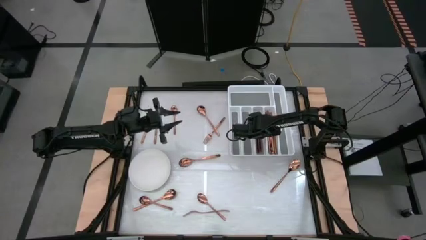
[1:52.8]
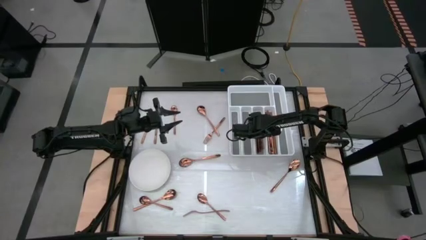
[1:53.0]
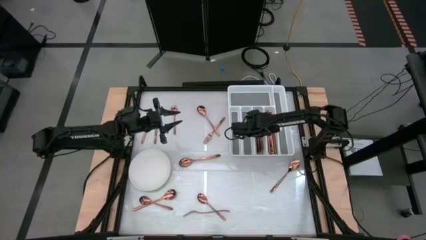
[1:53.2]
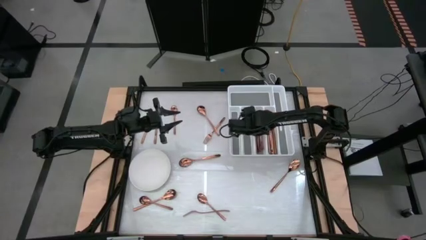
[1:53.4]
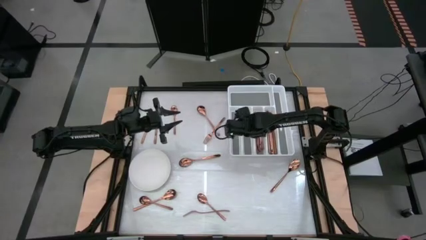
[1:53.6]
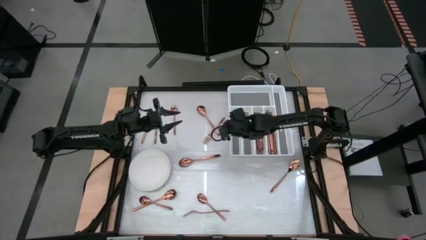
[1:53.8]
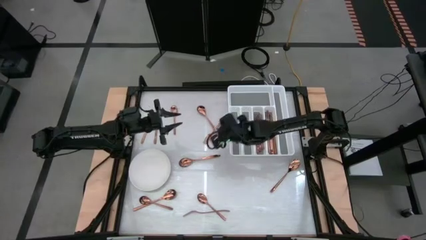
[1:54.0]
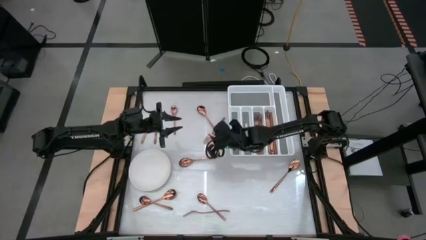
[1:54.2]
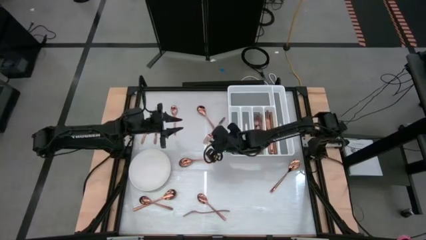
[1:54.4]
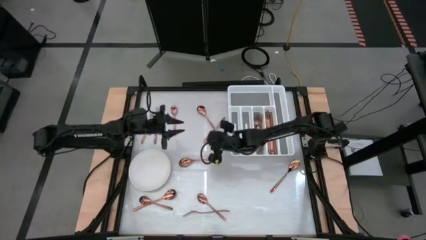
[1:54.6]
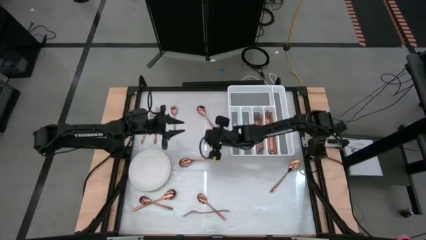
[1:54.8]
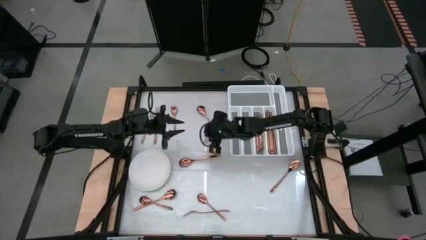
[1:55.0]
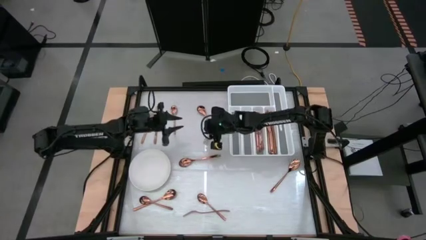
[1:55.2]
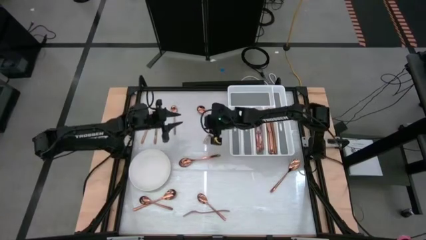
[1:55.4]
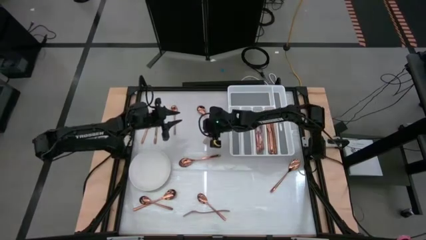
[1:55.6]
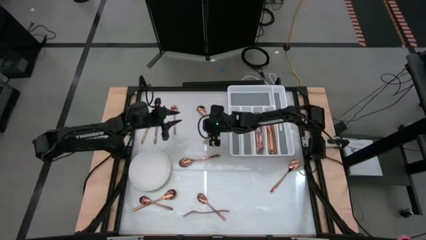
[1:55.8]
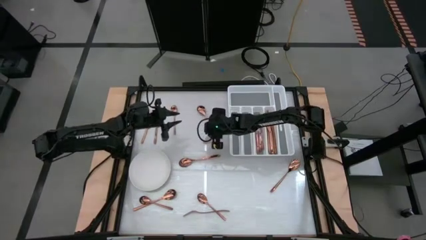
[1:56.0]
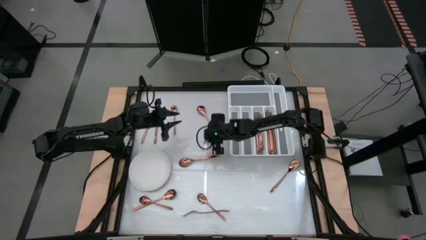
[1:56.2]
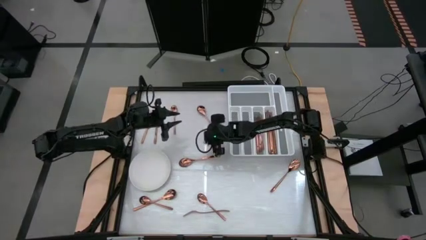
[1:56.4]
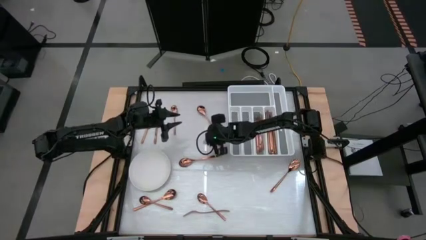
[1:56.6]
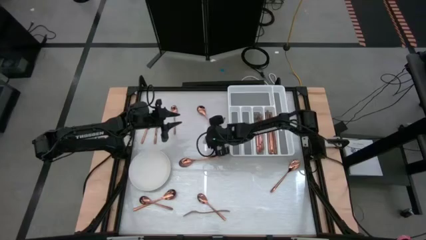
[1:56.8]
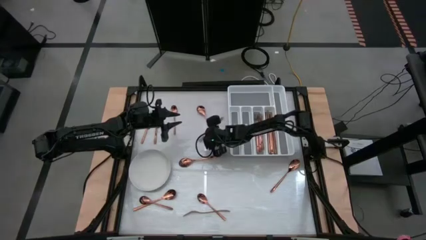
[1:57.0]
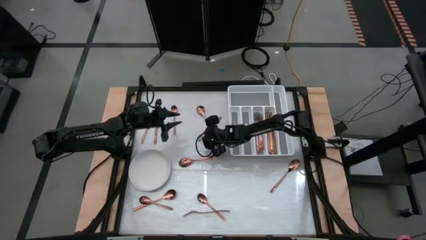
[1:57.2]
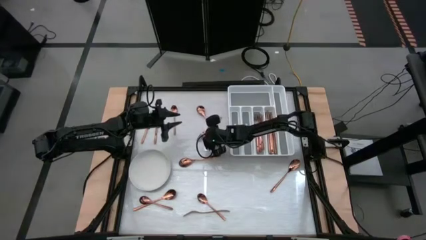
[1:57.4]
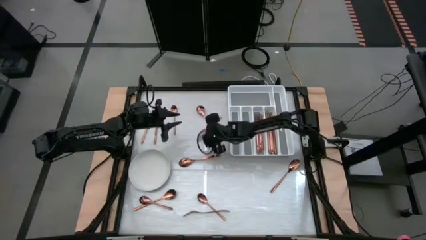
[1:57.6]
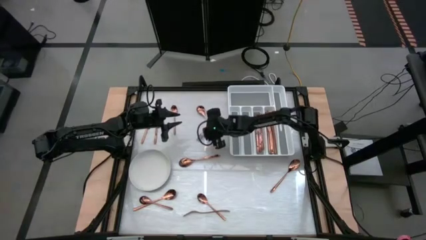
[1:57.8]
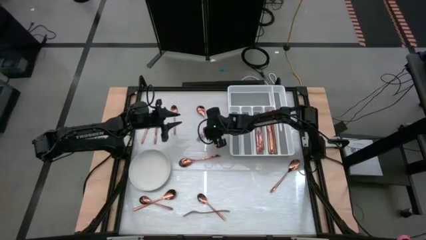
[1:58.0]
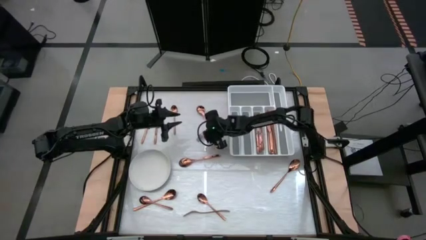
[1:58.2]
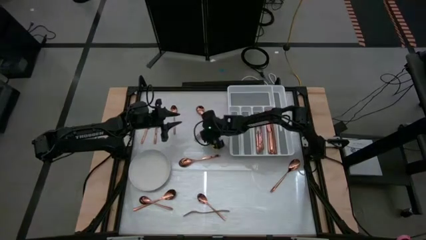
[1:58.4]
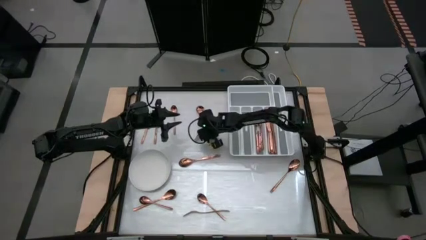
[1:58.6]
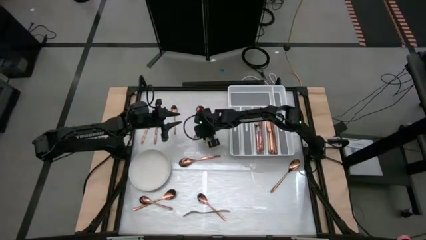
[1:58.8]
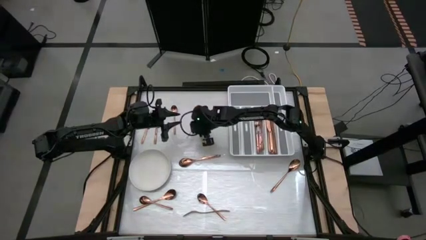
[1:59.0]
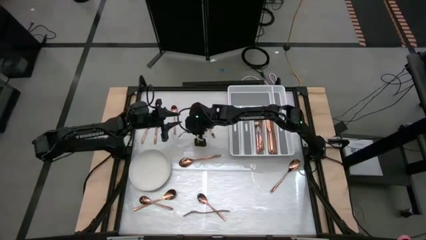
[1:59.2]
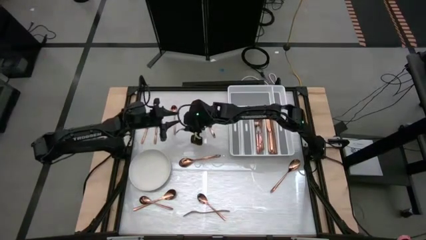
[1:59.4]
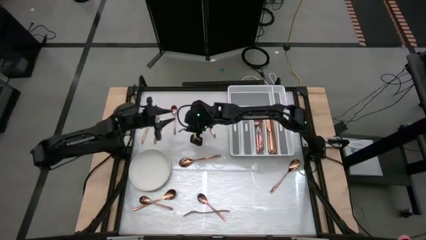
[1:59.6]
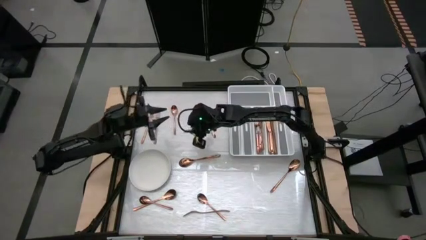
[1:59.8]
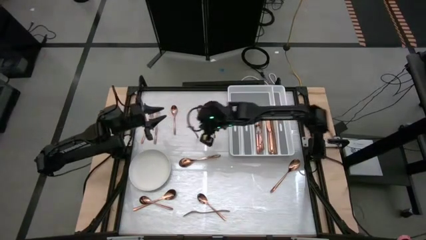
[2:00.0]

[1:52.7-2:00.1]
Task: Sort silverware
Put the bronze fork into the silverware tray

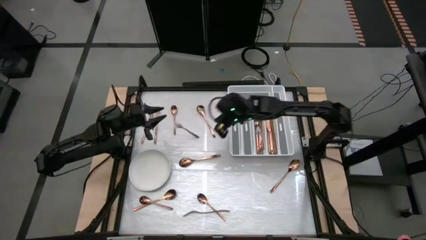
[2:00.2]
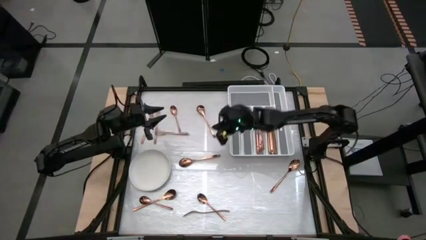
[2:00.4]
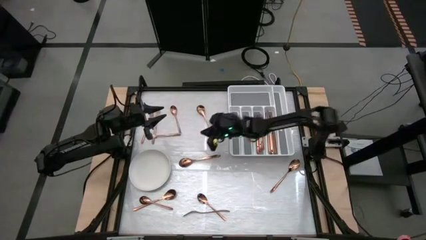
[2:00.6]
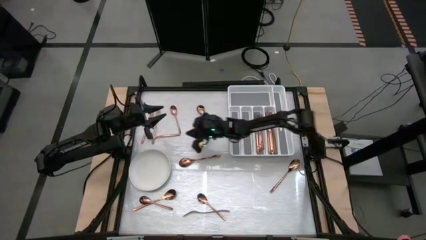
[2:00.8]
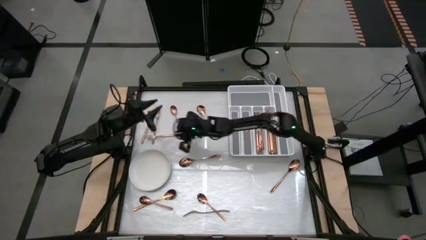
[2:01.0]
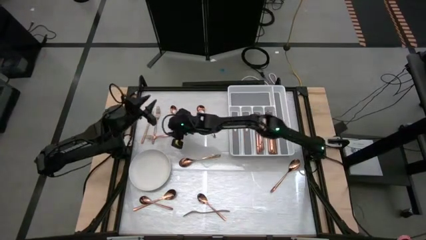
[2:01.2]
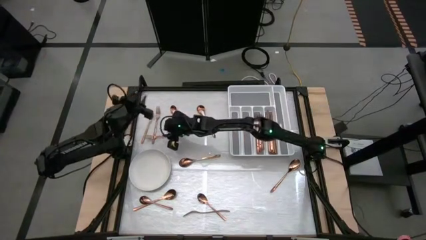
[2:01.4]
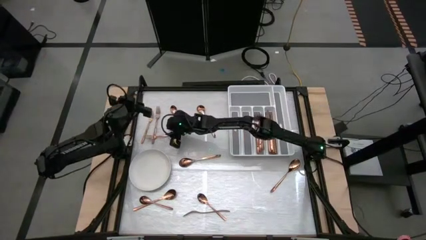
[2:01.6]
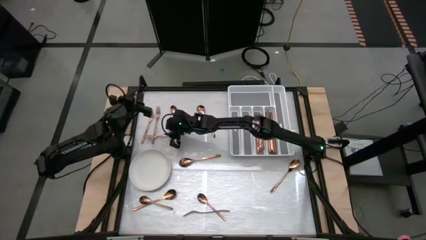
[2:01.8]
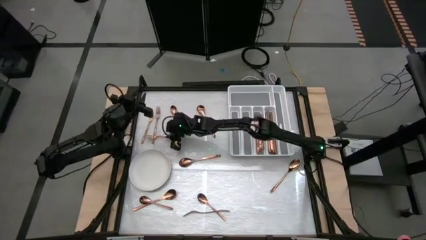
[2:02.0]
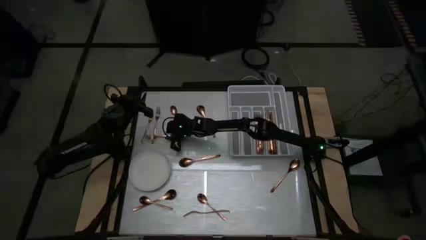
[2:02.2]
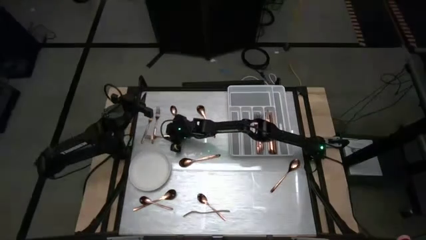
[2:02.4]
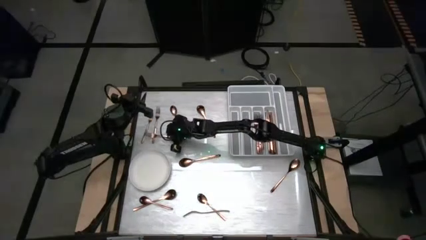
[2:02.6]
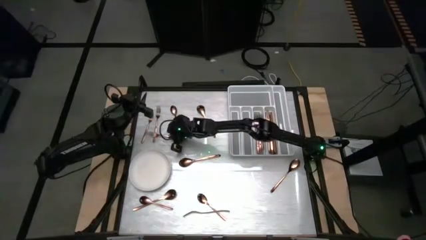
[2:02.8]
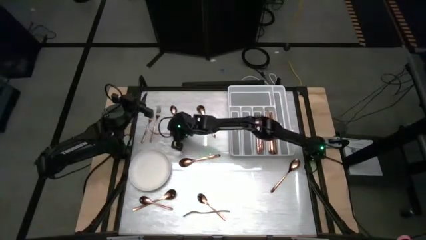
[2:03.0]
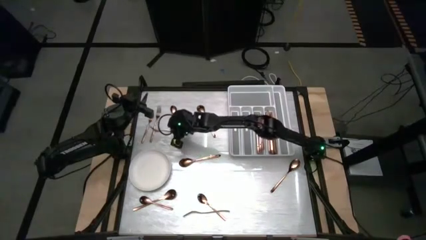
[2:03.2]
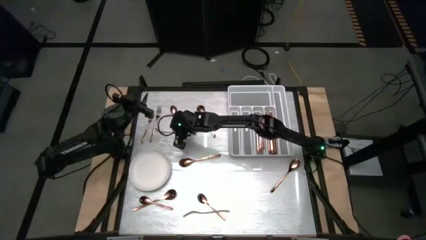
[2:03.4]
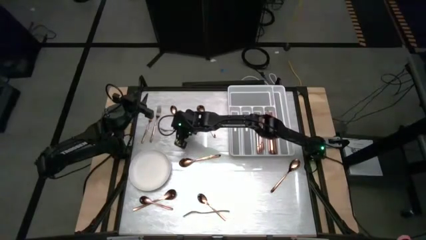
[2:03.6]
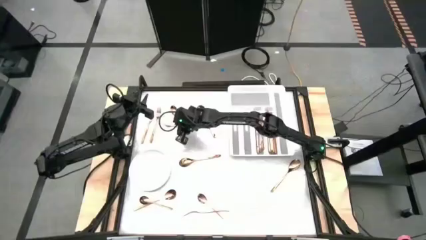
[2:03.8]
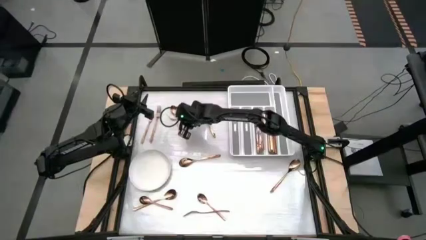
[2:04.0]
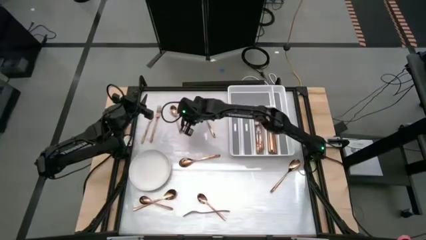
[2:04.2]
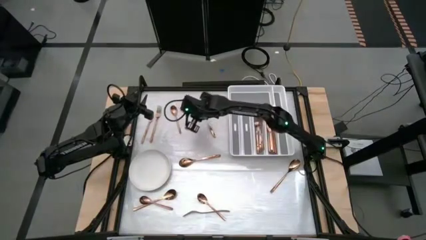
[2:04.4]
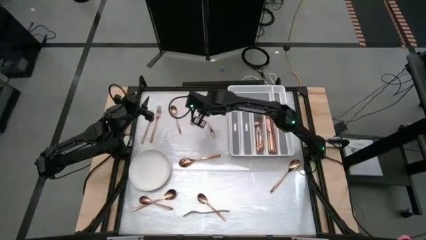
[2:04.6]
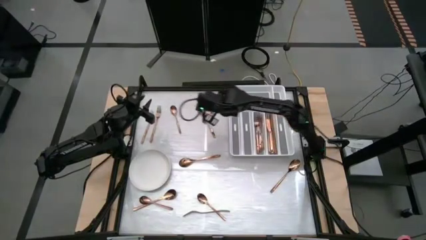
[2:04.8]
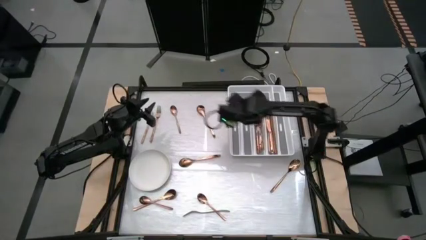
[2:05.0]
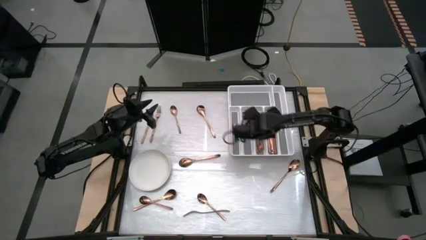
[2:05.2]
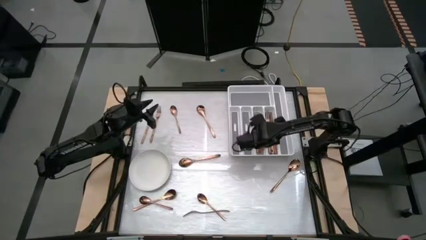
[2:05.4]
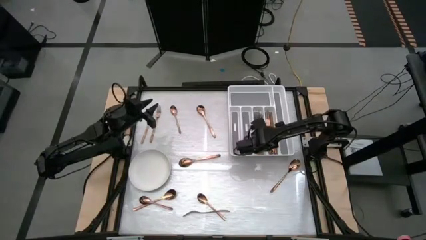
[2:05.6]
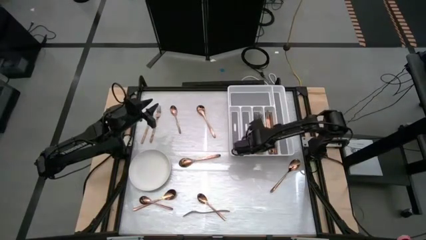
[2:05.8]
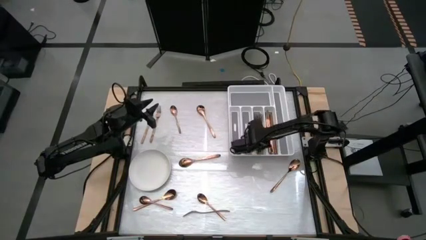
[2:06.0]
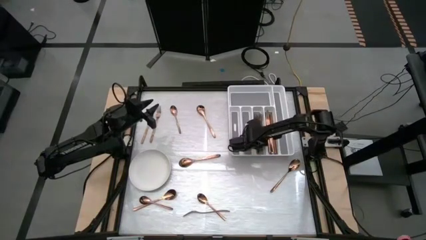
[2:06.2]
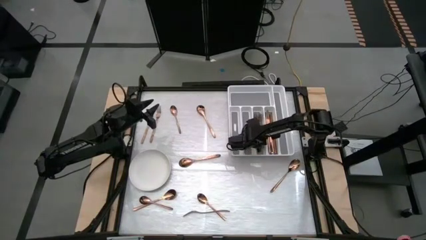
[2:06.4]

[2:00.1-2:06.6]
Put the bronze fork into the silverware tray
